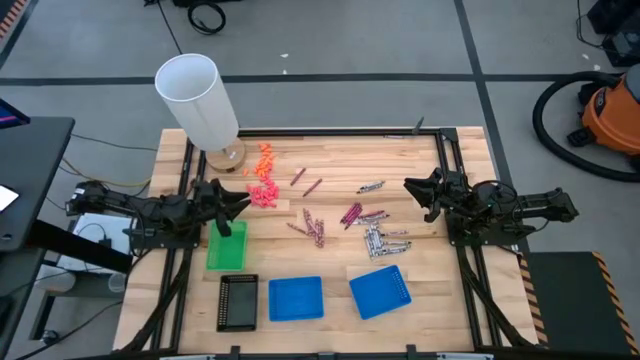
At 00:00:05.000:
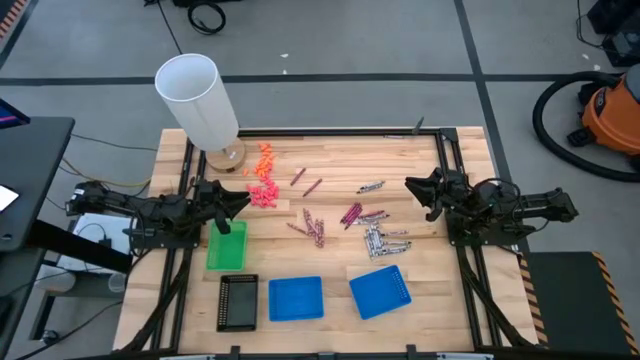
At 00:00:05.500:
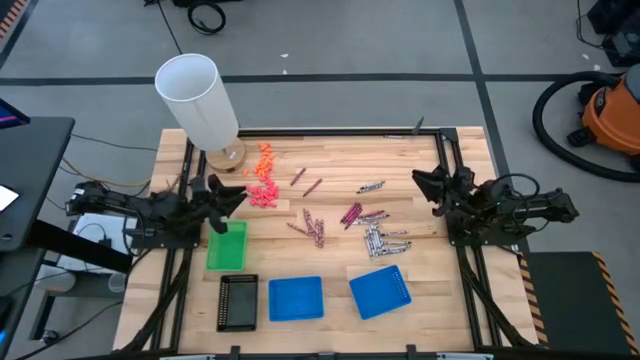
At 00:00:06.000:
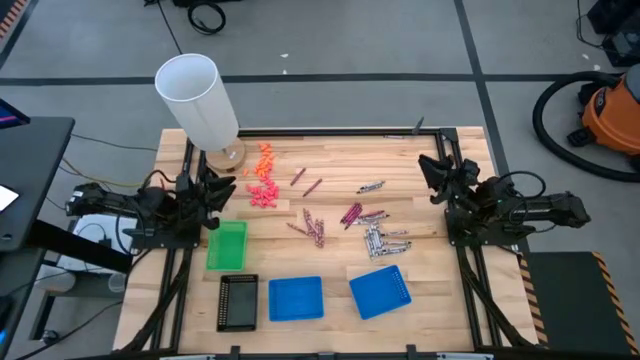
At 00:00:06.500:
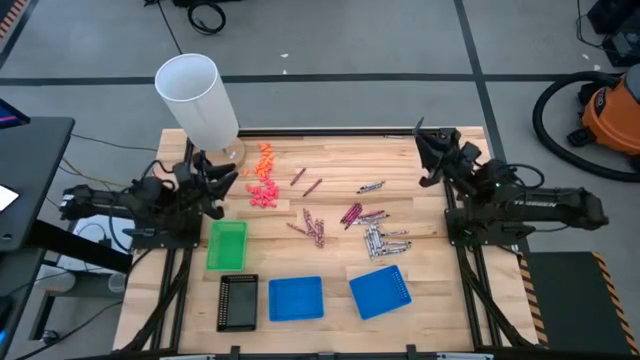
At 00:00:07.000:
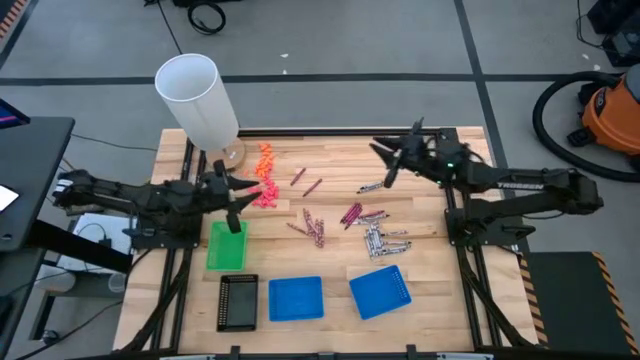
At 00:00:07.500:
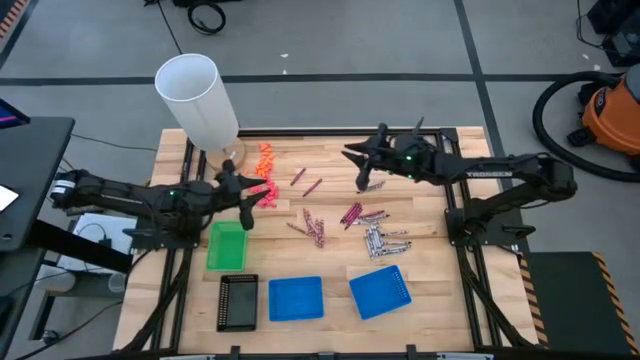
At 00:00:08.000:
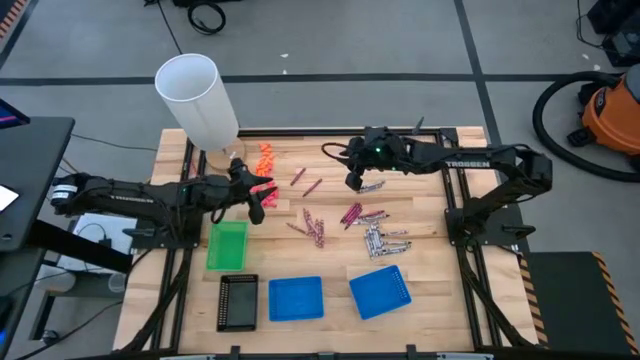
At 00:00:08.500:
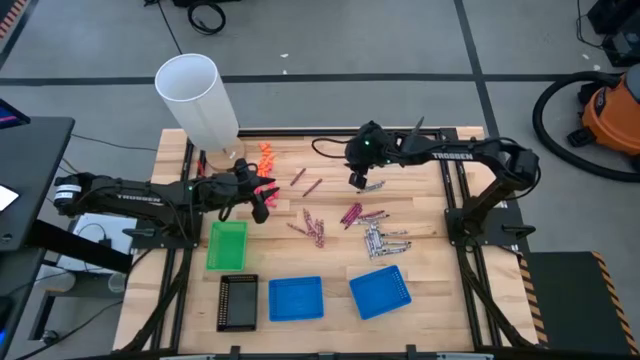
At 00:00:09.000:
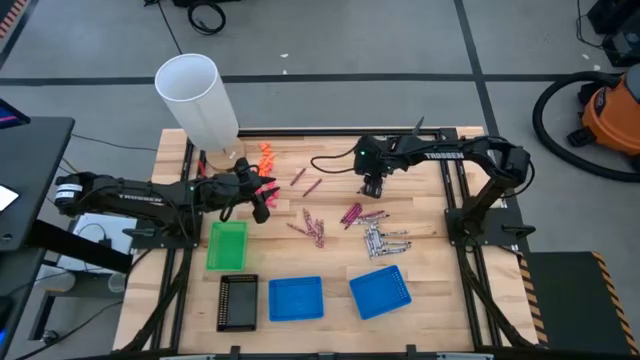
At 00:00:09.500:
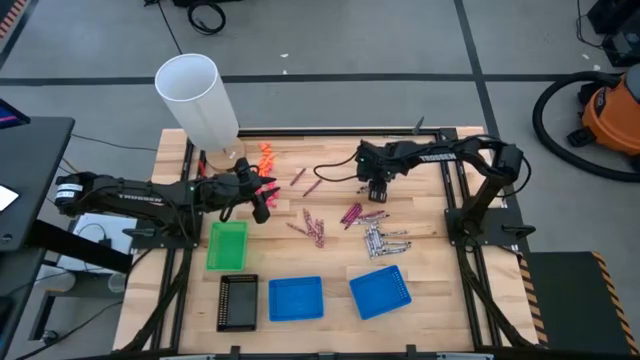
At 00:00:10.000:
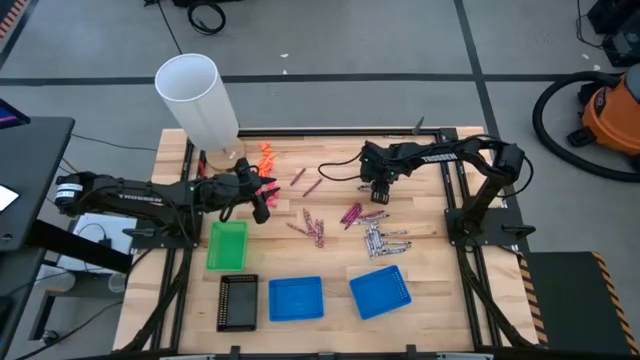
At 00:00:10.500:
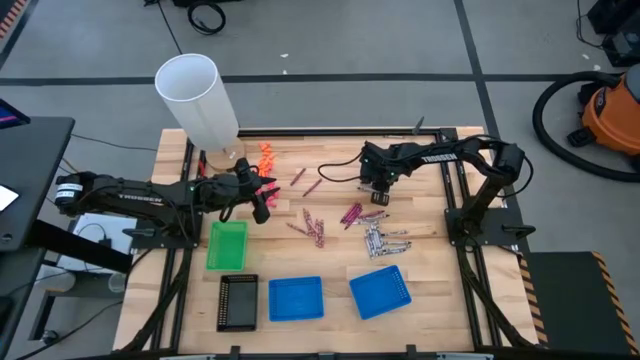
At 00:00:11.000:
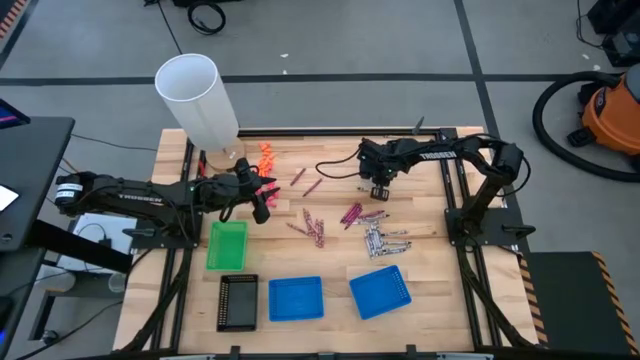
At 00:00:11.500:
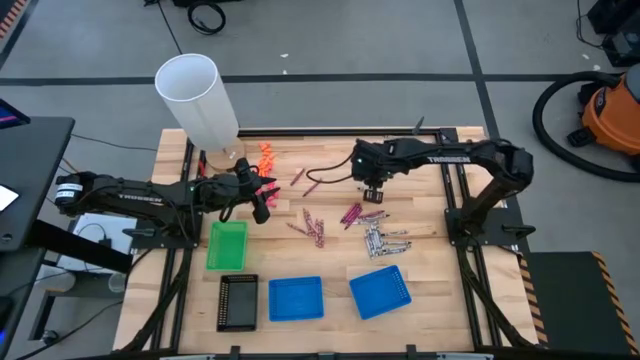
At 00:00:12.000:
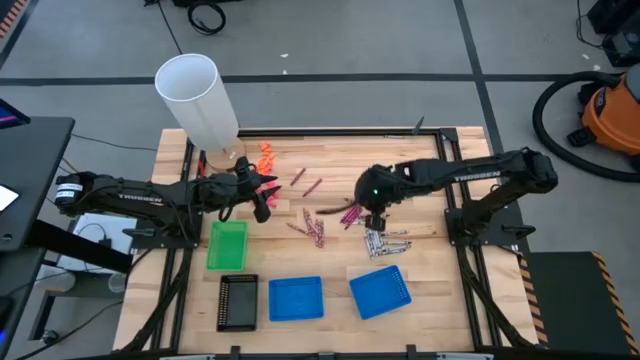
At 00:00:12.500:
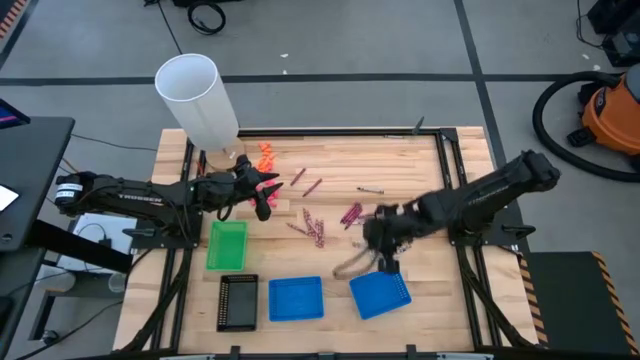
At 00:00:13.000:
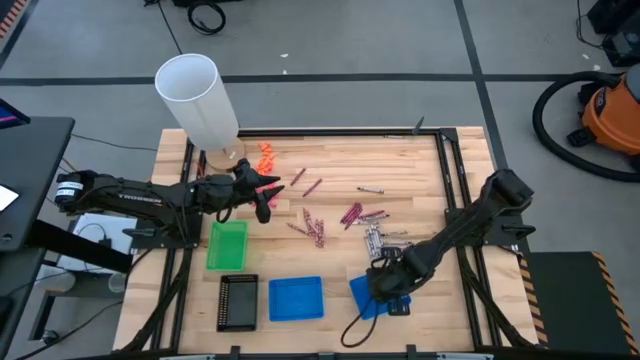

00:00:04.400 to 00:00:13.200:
Task: Sort crayons
Put the black crayon into the right blue basket

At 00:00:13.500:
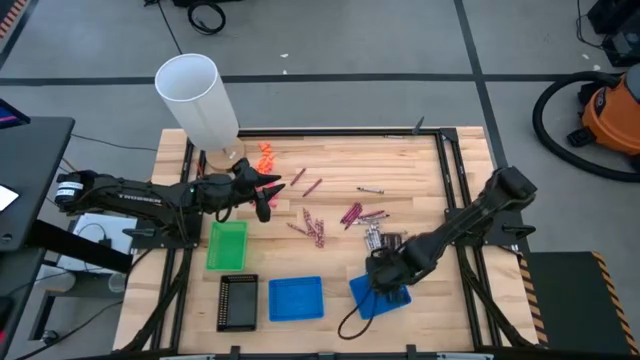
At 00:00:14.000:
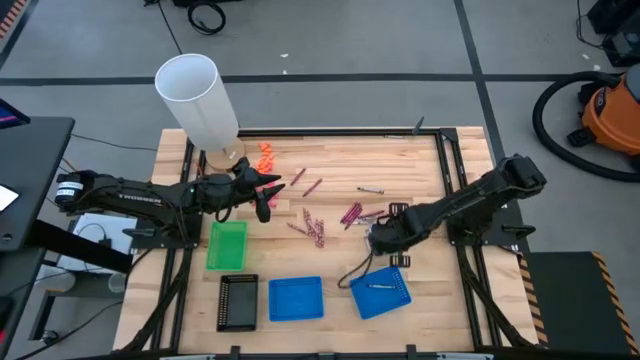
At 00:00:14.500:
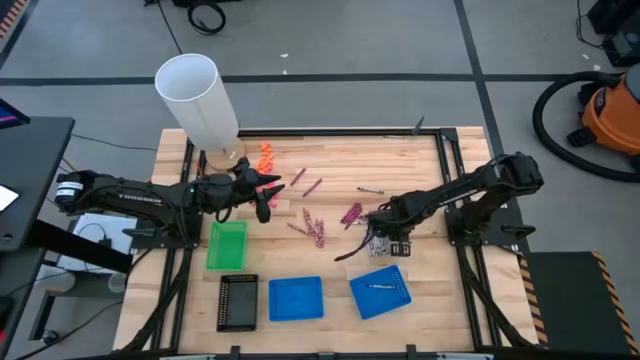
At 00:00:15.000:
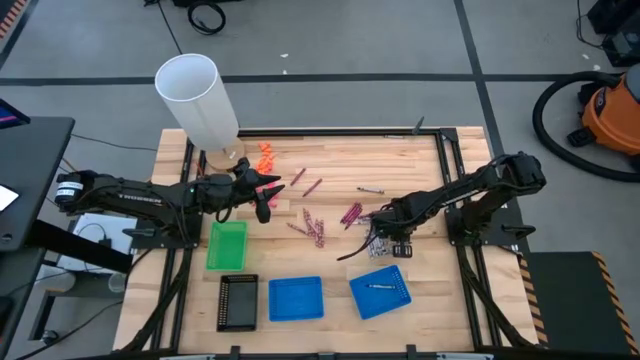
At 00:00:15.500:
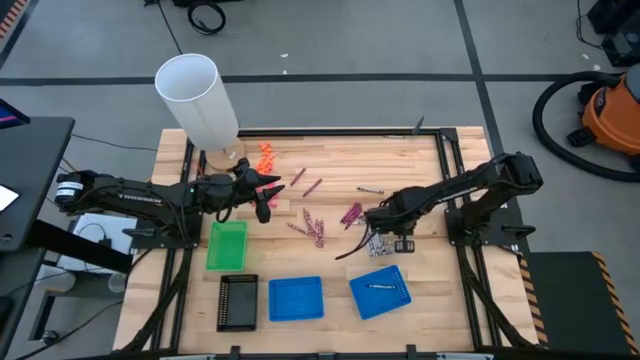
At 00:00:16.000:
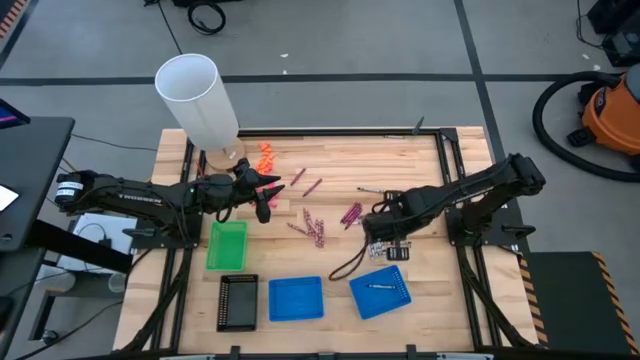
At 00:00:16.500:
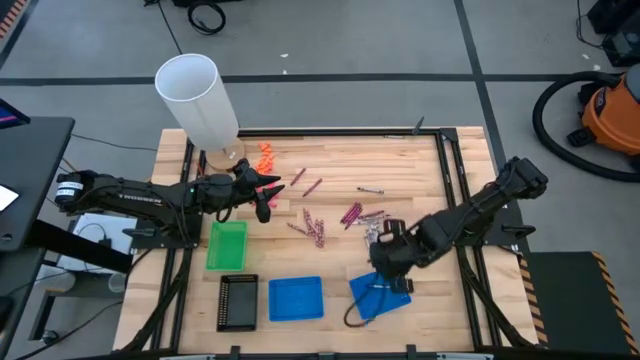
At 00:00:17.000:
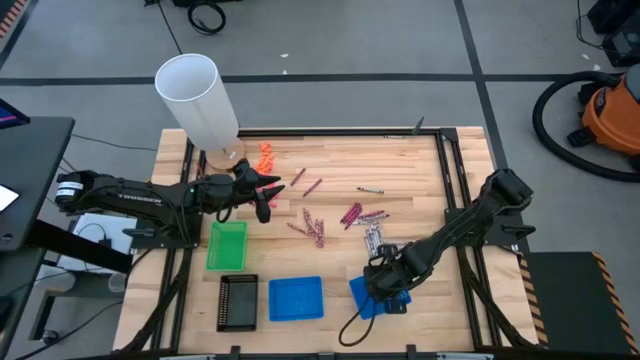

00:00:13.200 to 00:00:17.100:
Put the black crayon into the right blue basket

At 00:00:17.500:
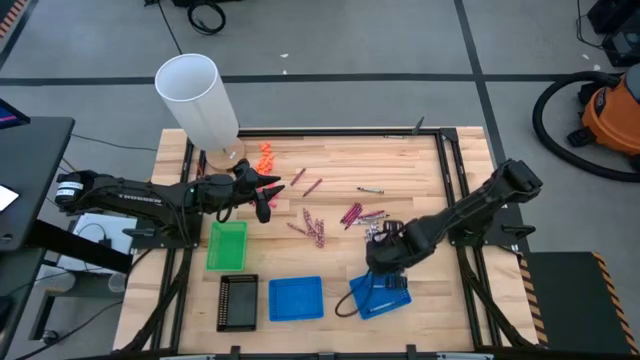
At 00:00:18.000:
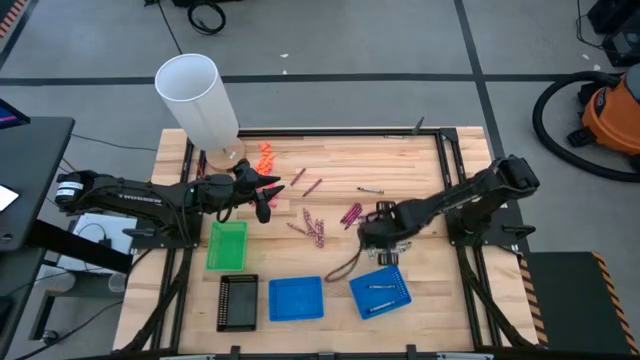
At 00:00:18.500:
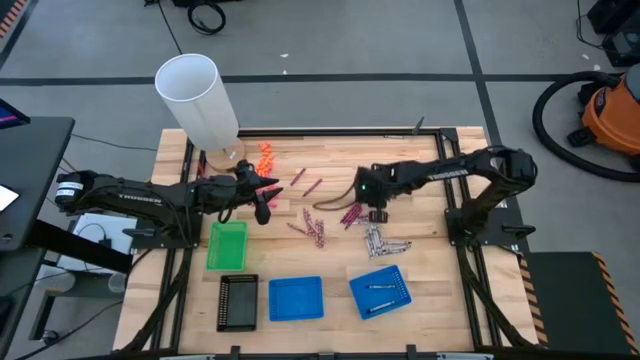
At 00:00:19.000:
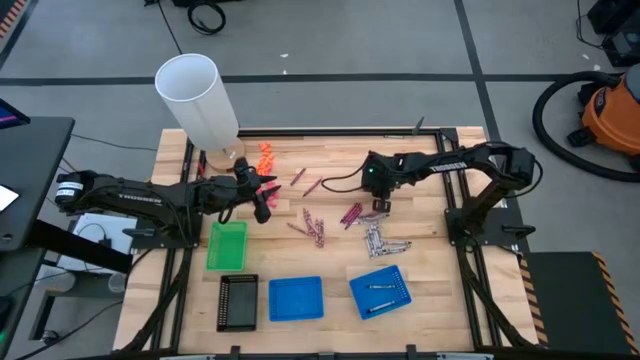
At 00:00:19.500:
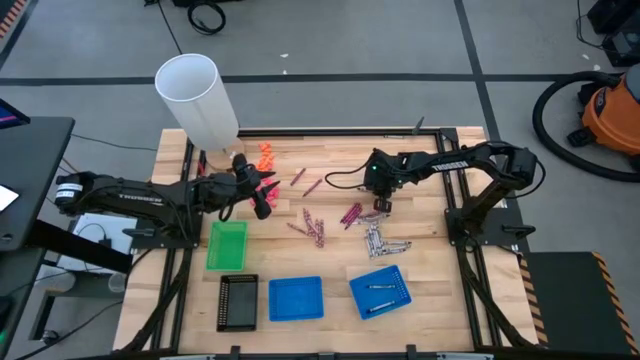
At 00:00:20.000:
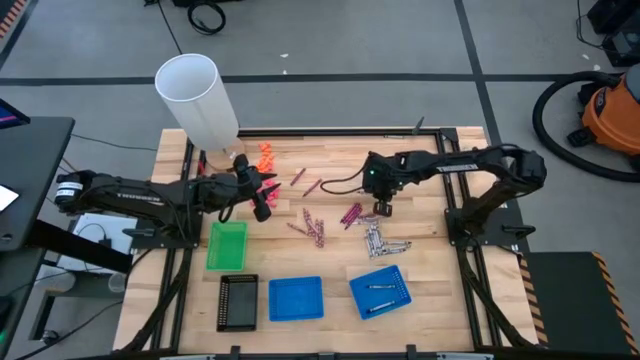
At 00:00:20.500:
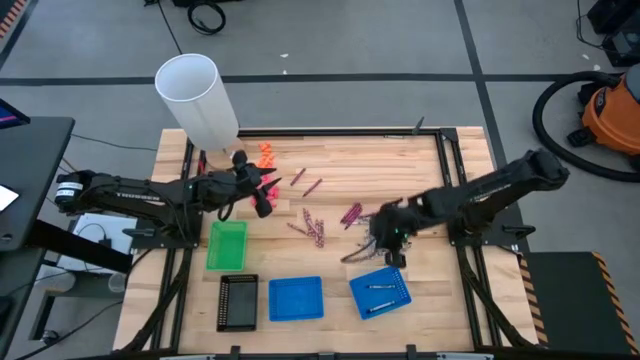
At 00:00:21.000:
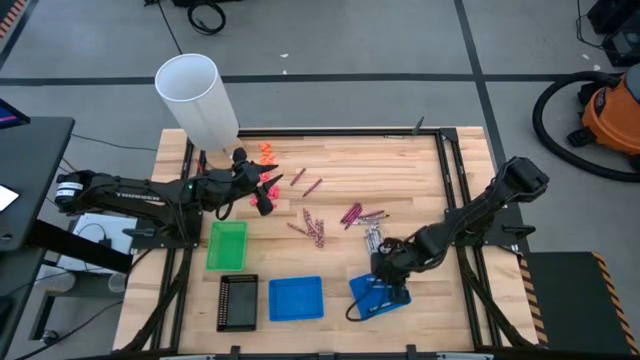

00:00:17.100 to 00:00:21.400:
Put the black crayon into the right blue basket

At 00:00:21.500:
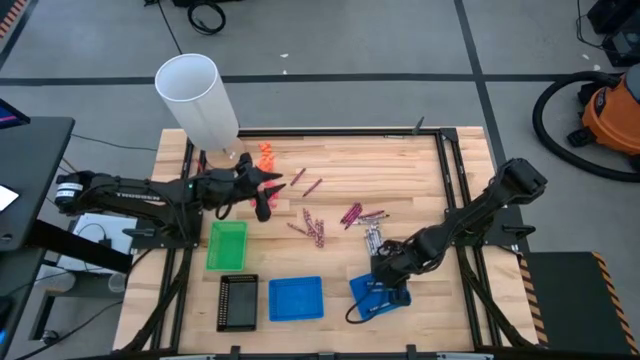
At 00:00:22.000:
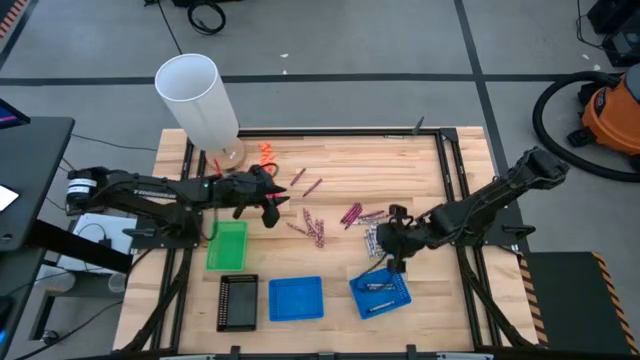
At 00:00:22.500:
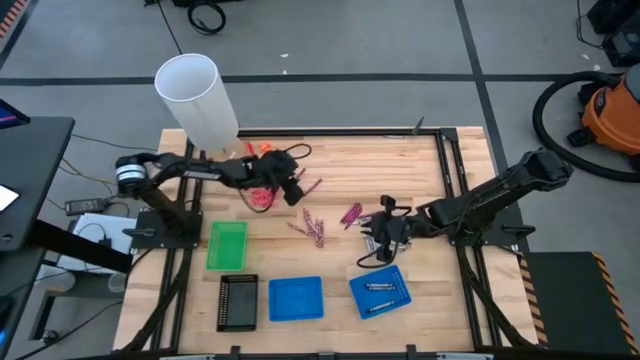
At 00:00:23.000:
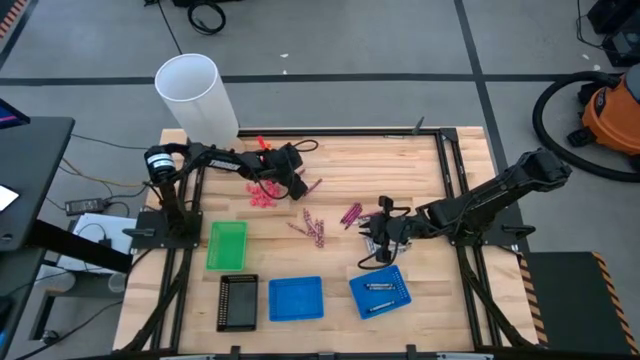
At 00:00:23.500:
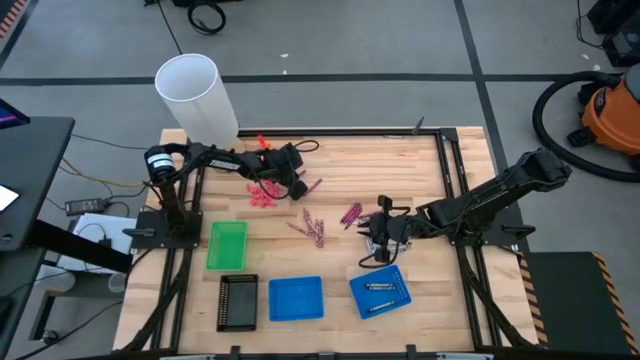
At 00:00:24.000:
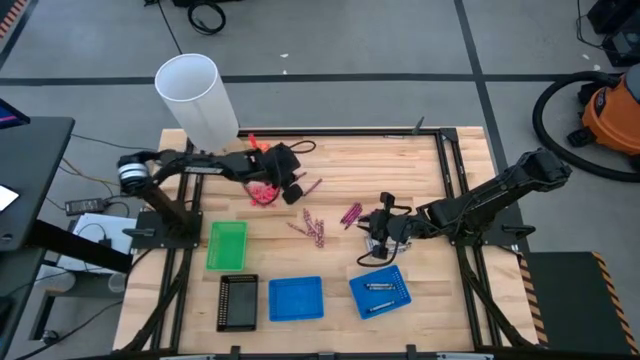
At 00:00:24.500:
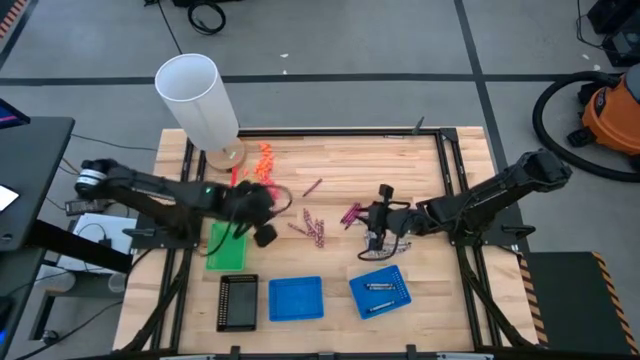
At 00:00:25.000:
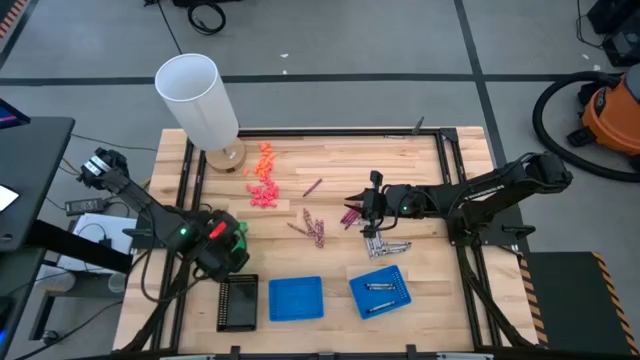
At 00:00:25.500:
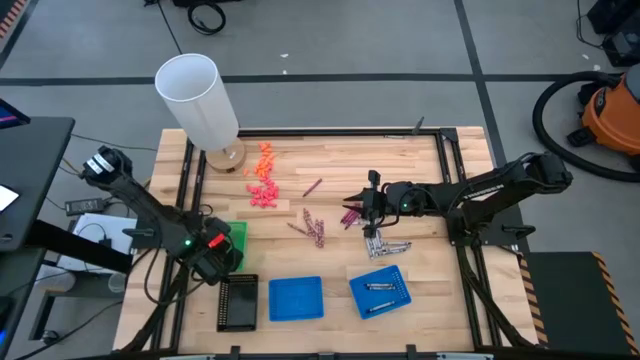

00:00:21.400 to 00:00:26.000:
Put the red crayon into the green basket
